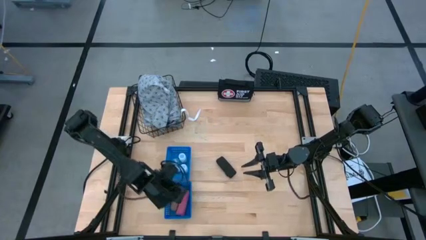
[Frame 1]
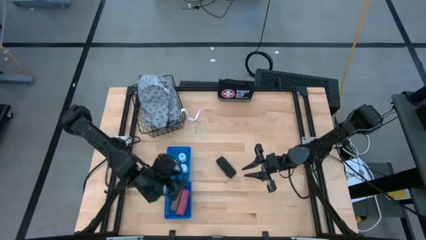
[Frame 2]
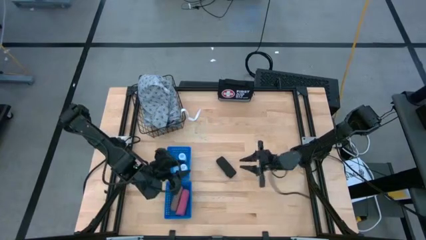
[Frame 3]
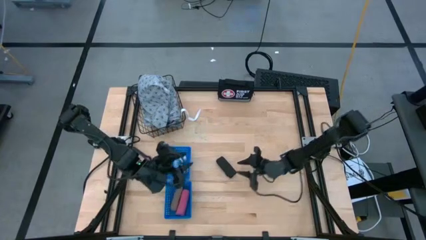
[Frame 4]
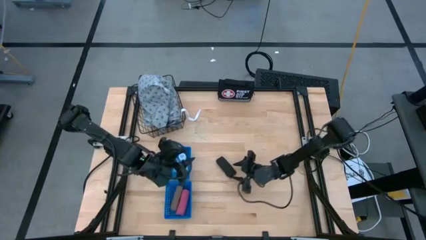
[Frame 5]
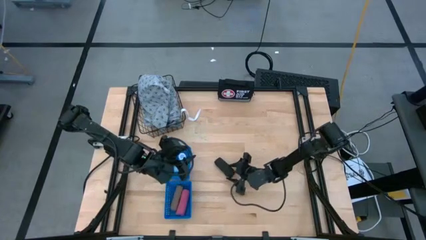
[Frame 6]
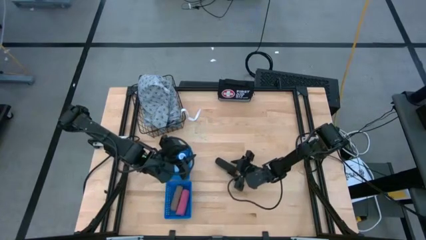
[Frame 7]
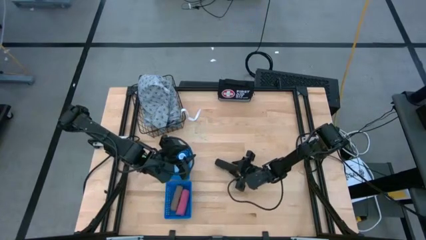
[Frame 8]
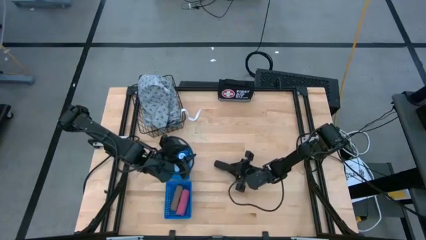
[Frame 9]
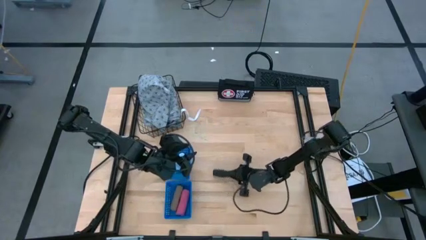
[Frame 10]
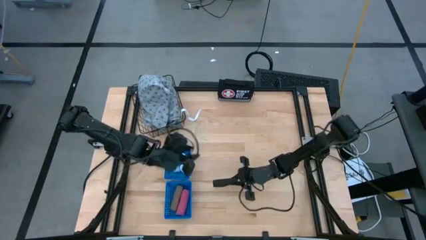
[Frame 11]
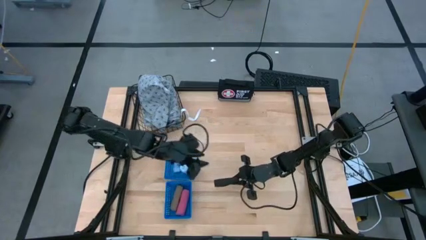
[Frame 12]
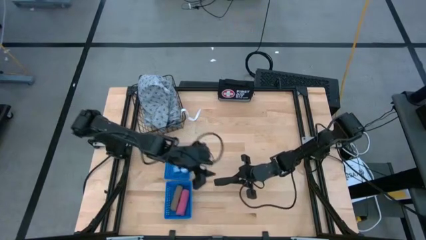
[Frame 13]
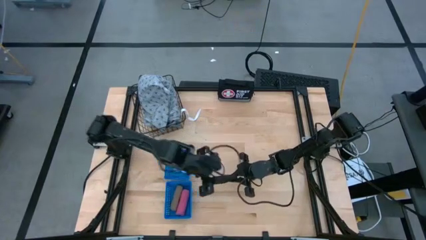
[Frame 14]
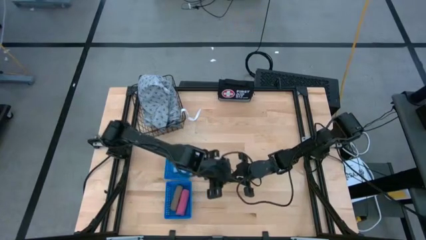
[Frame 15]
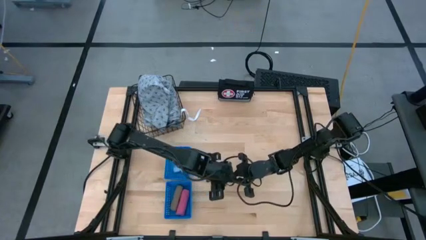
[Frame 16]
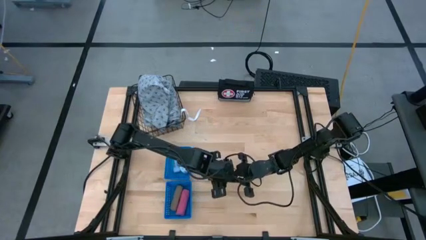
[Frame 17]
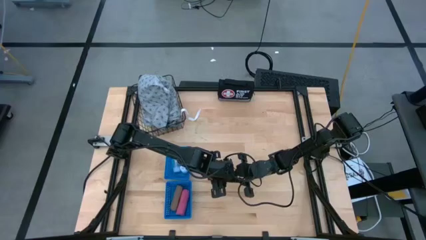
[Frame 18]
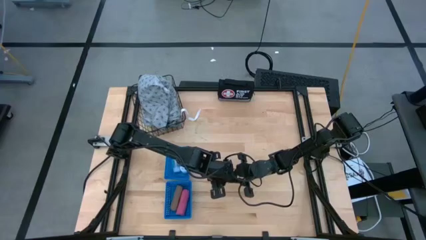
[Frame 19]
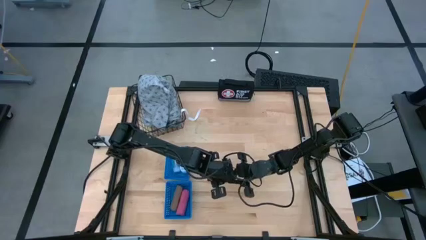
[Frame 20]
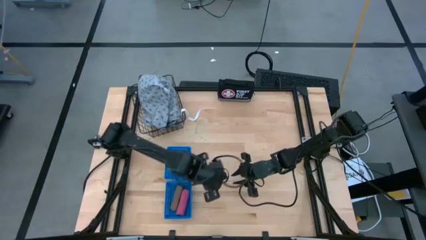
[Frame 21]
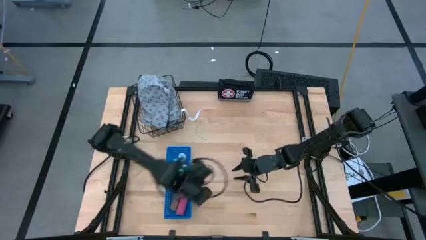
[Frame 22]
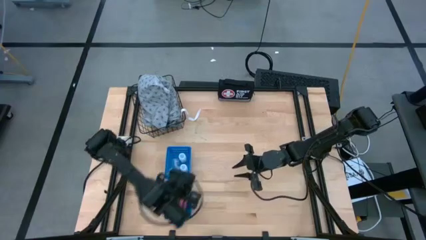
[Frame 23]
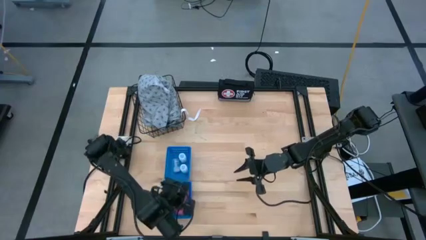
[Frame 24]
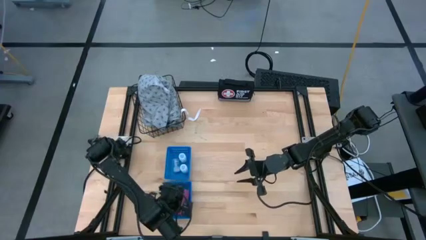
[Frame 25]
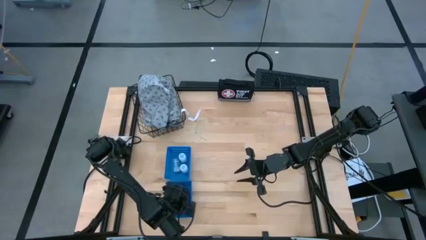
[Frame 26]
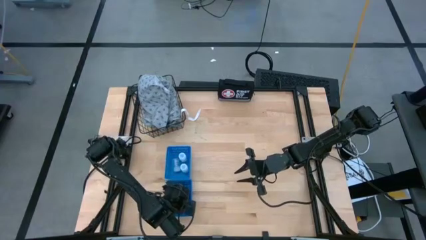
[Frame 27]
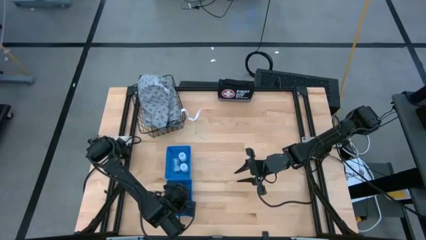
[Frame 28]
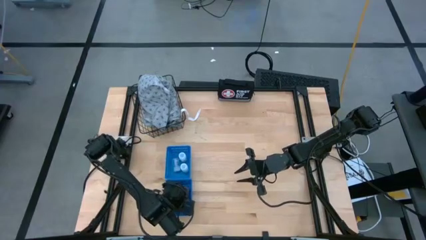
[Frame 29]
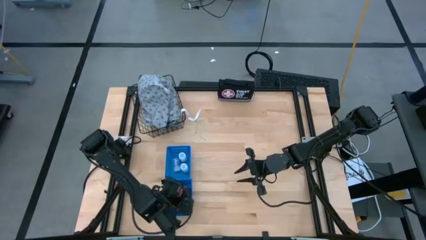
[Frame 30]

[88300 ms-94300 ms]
Task: Pick & Place Medicine items
Put the black bandage into bottom blue basket

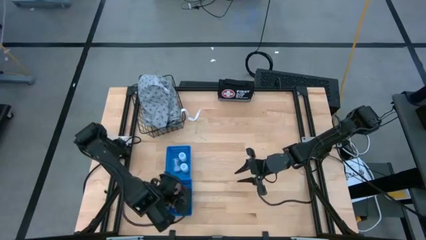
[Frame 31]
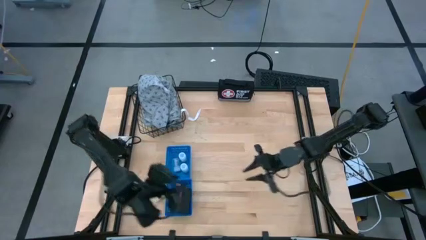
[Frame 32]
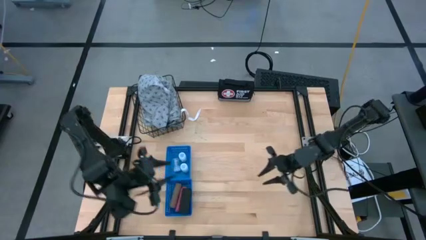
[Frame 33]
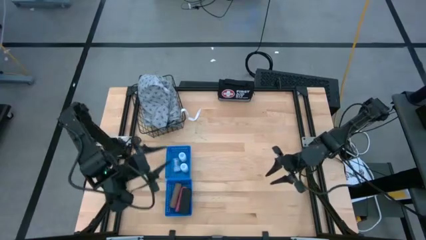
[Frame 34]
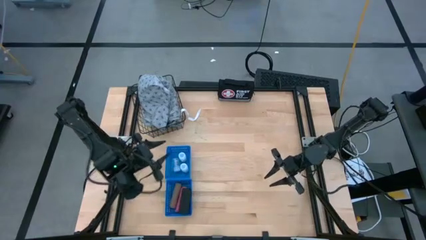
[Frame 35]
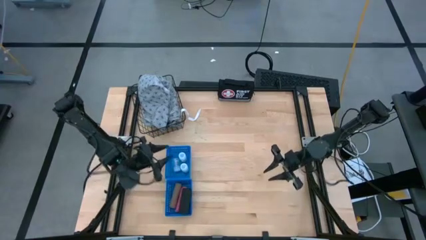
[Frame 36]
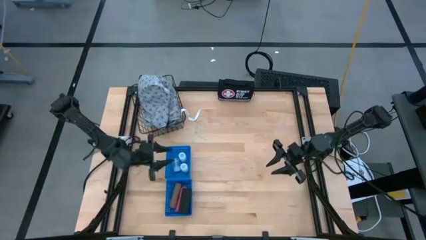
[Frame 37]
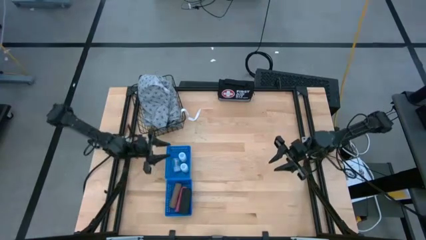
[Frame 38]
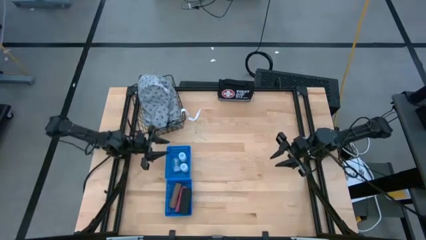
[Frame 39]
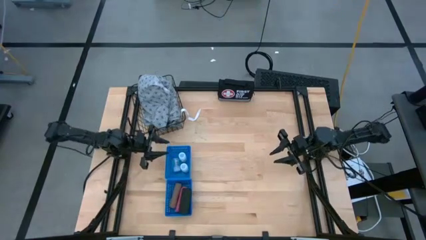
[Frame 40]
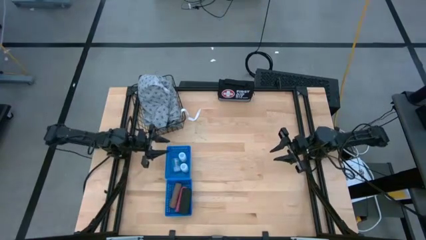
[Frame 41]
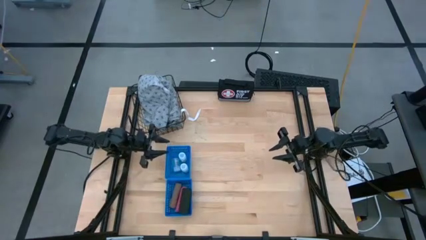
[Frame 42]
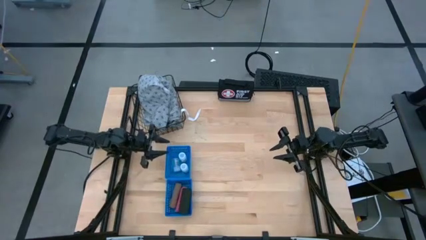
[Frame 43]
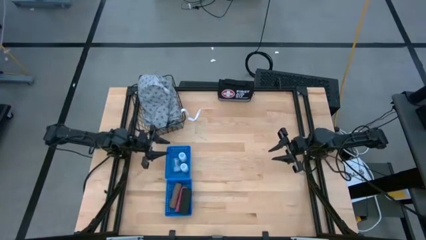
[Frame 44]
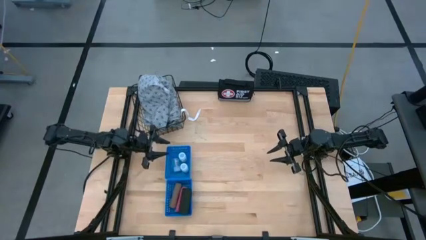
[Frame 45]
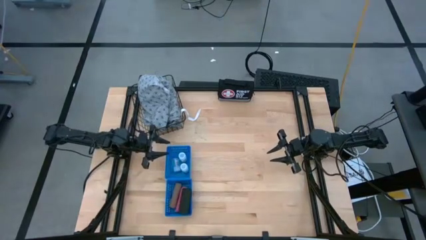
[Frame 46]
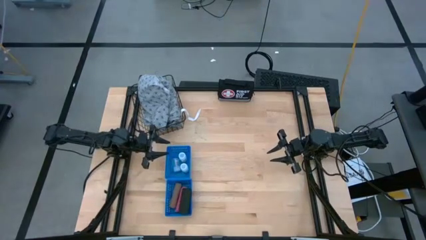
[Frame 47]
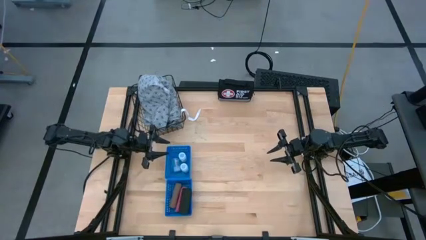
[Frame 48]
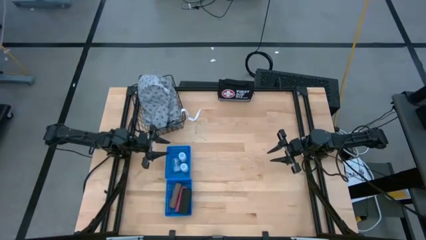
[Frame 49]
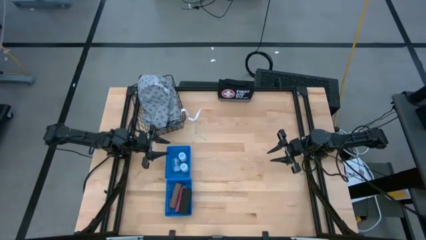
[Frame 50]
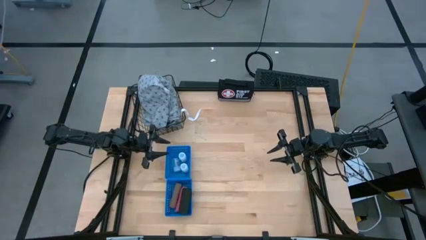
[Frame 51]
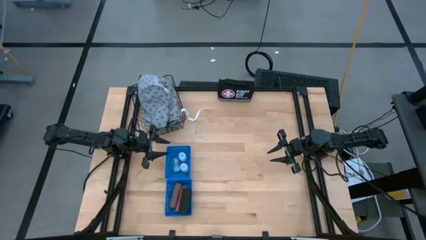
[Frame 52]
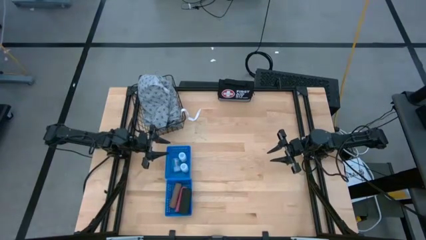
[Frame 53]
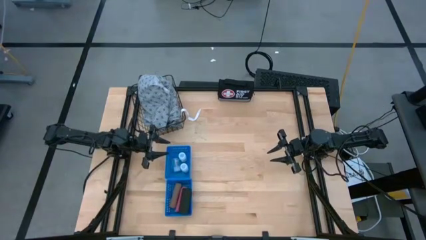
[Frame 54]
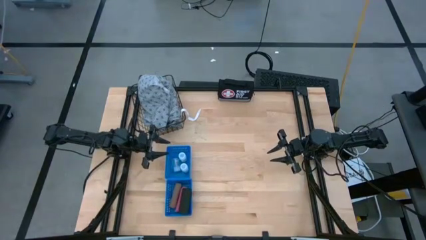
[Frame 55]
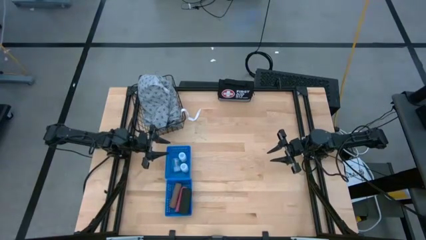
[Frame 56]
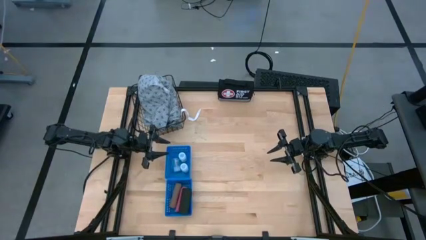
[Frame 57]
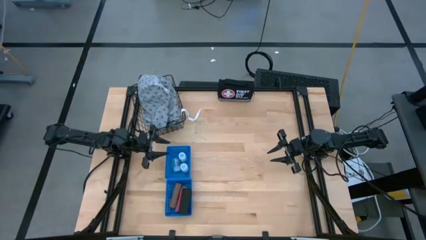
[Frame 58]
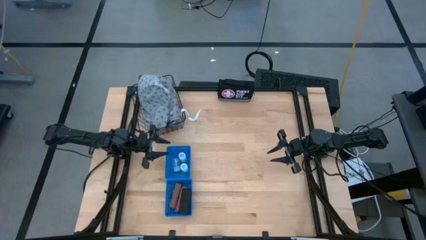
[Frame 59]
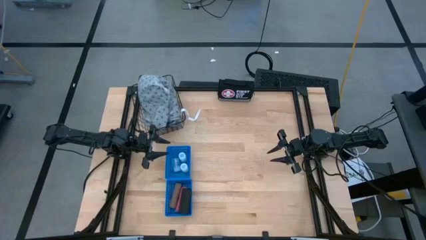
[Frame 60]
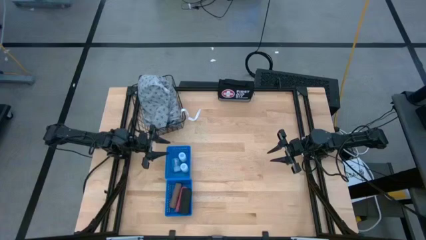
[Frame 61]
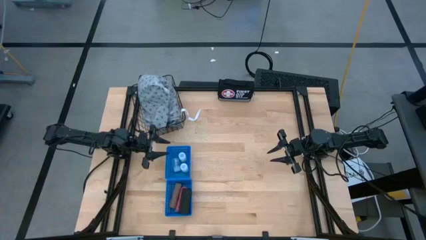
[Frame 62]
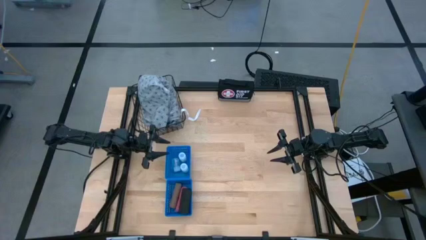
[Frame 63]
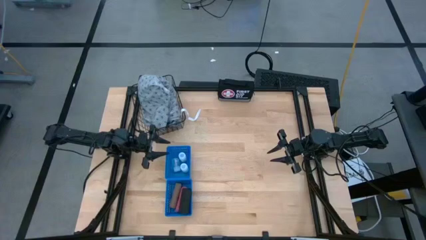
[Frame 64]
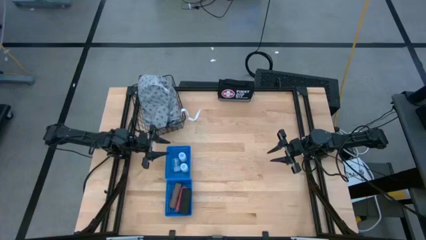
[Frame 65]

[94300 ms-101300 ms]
Return to Home Position
